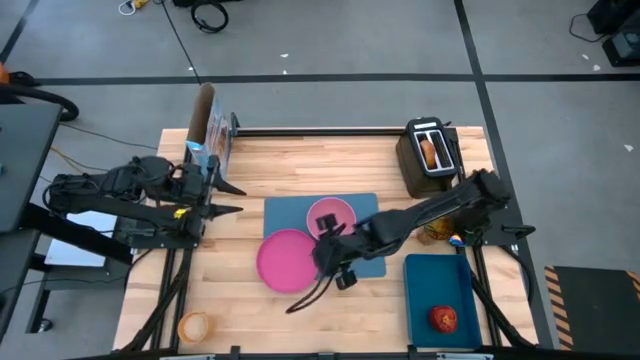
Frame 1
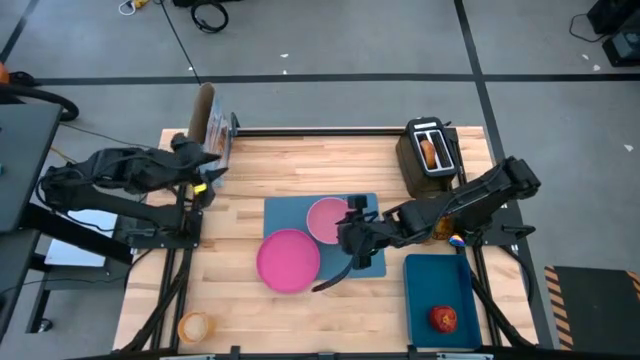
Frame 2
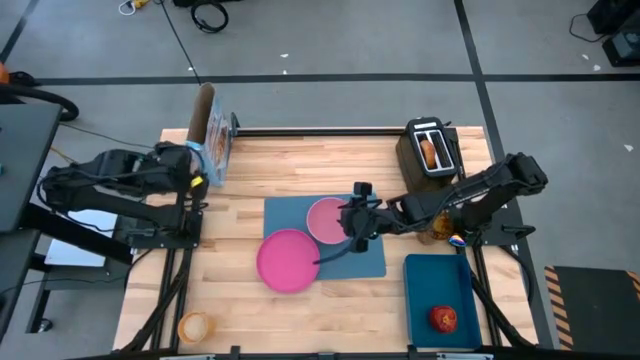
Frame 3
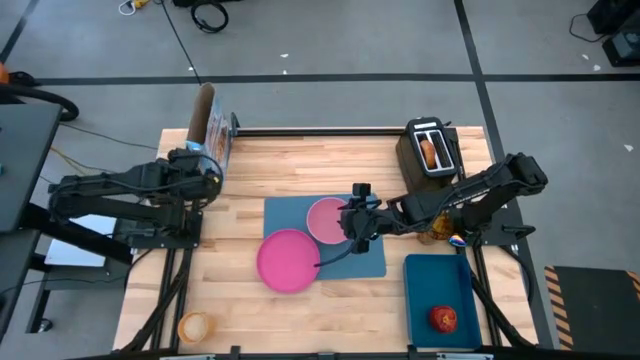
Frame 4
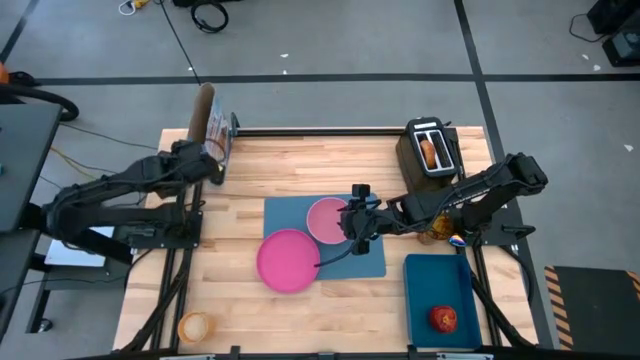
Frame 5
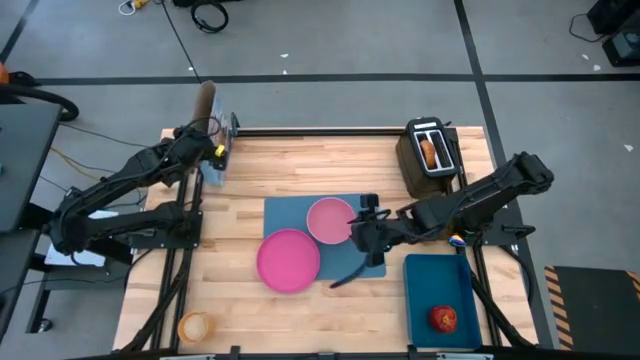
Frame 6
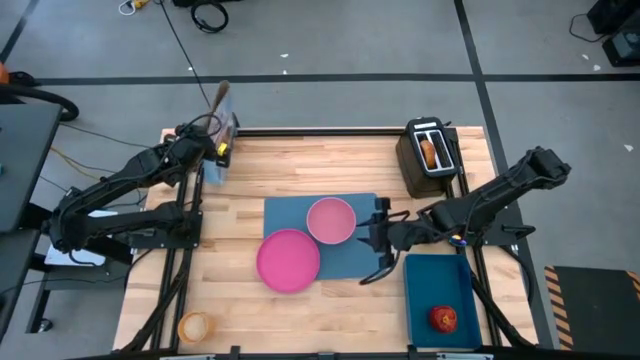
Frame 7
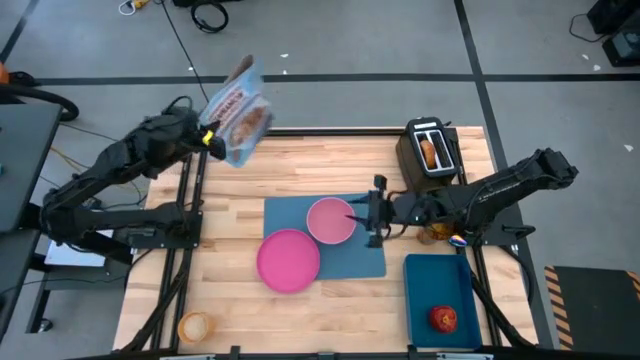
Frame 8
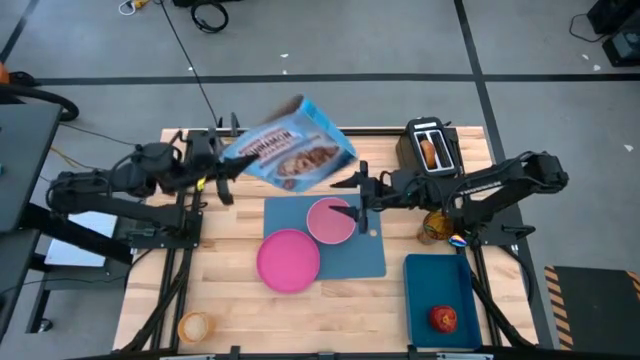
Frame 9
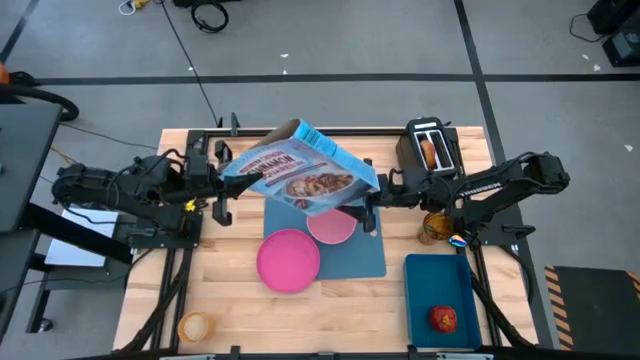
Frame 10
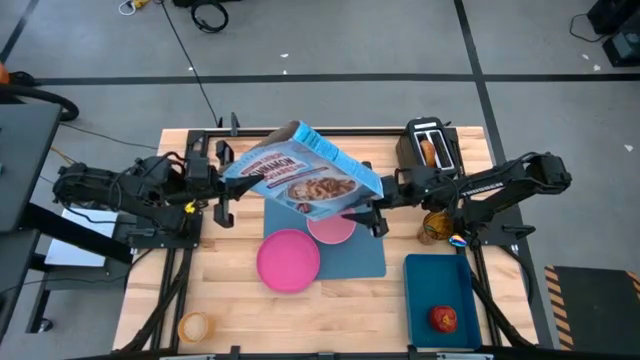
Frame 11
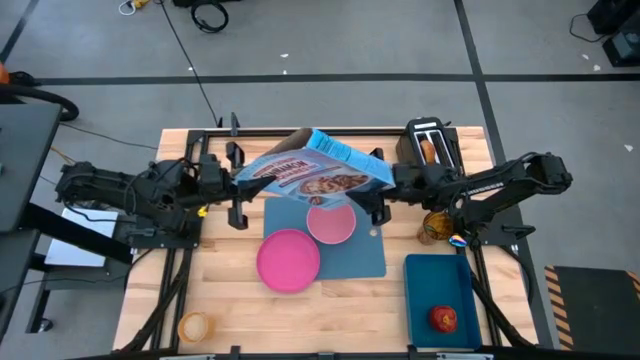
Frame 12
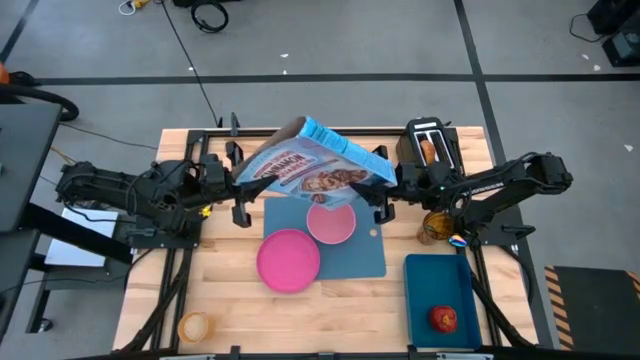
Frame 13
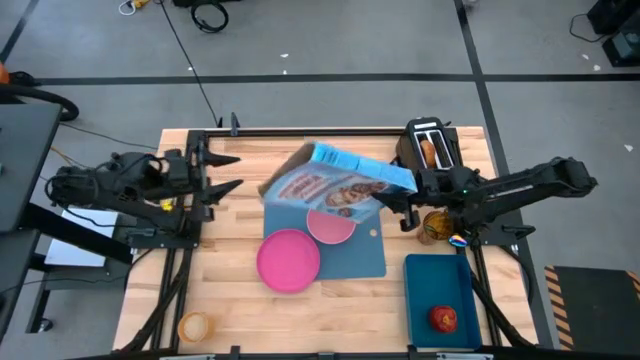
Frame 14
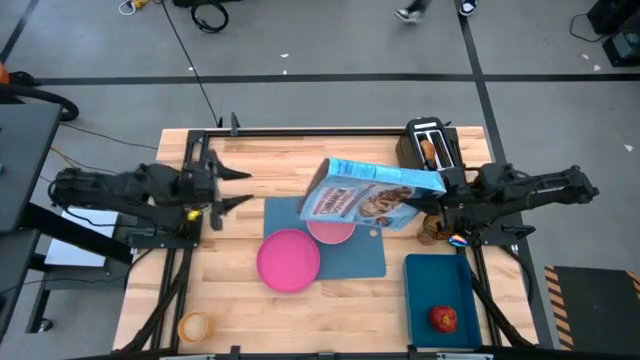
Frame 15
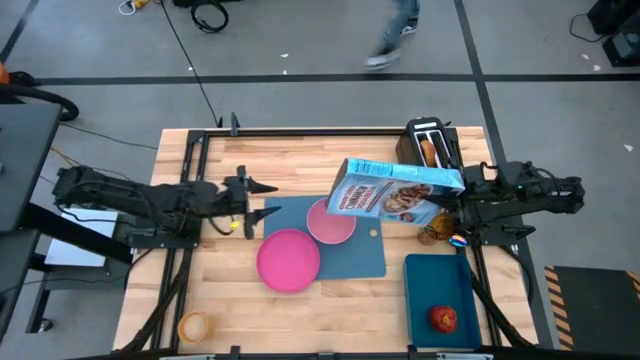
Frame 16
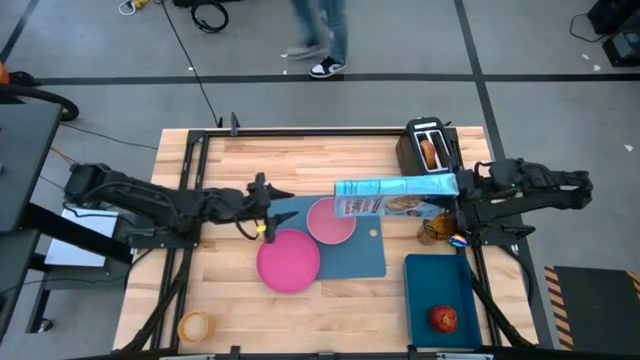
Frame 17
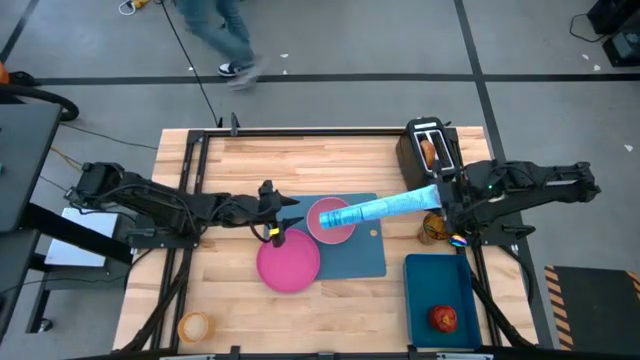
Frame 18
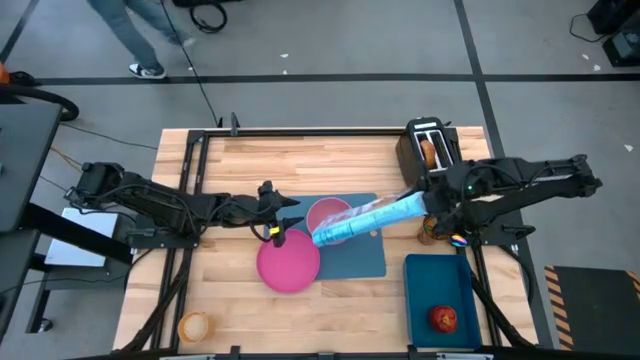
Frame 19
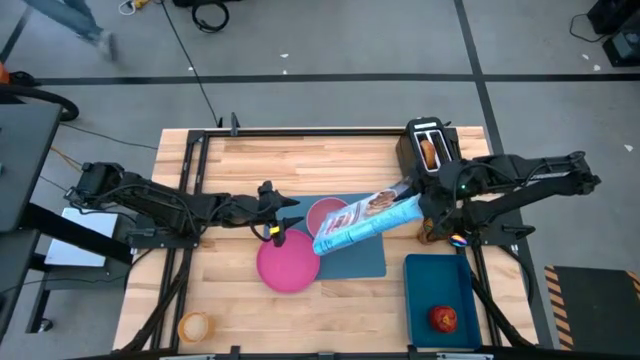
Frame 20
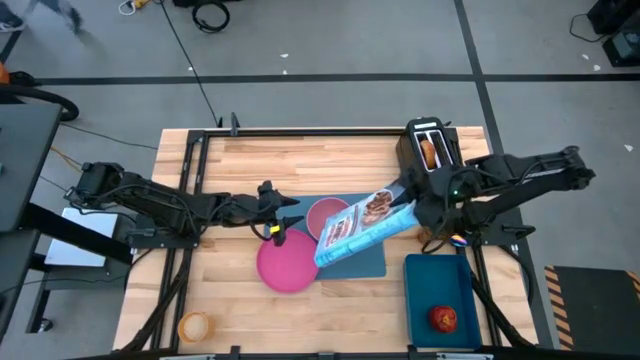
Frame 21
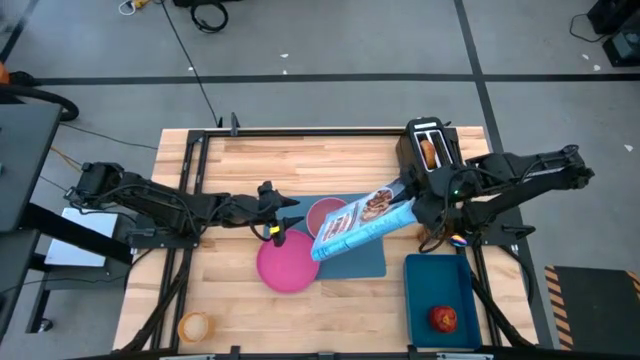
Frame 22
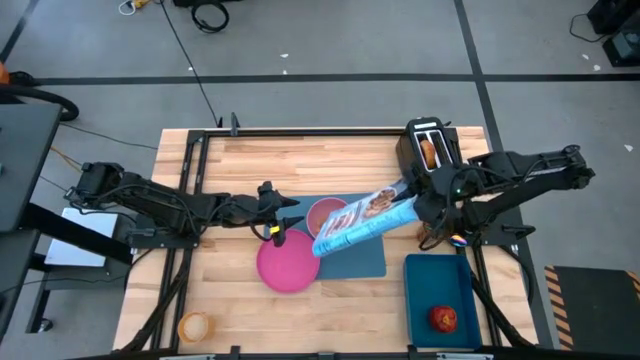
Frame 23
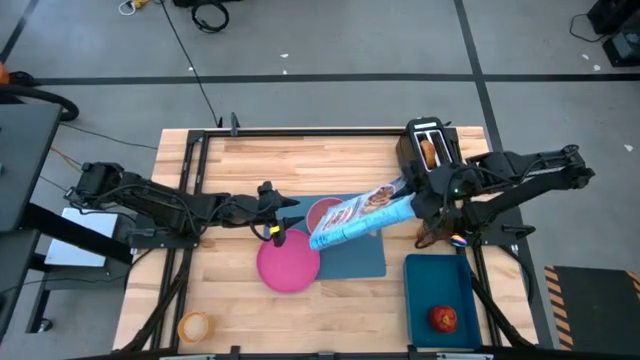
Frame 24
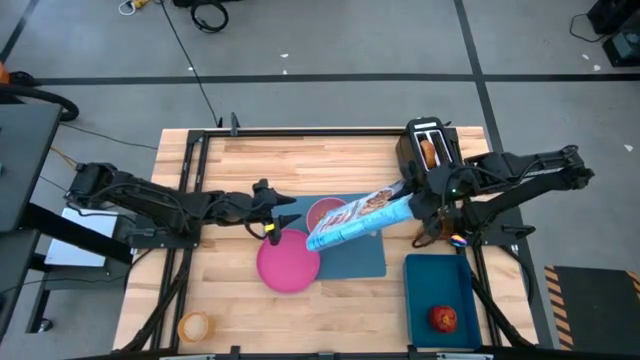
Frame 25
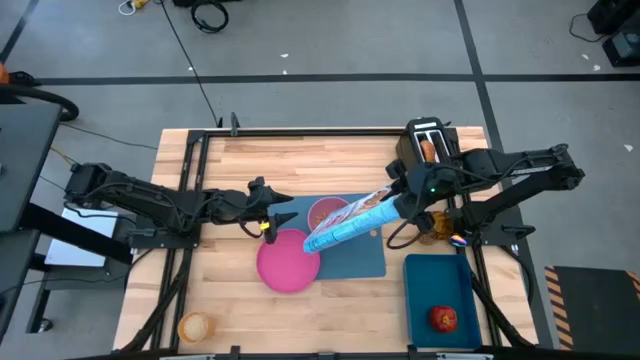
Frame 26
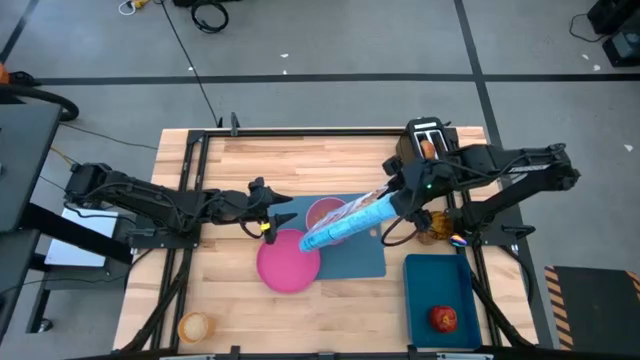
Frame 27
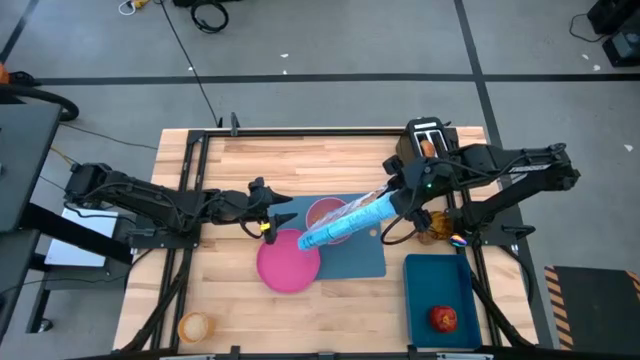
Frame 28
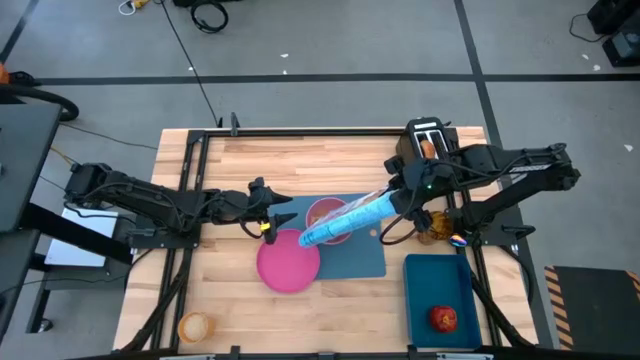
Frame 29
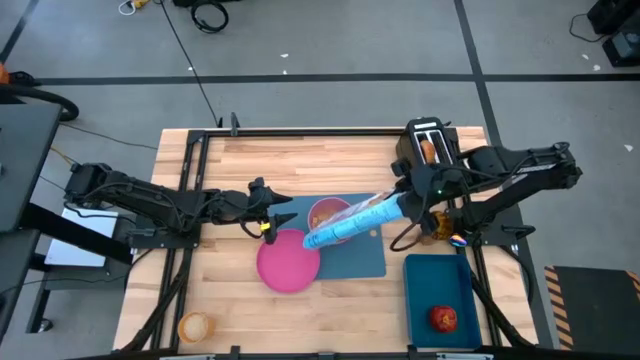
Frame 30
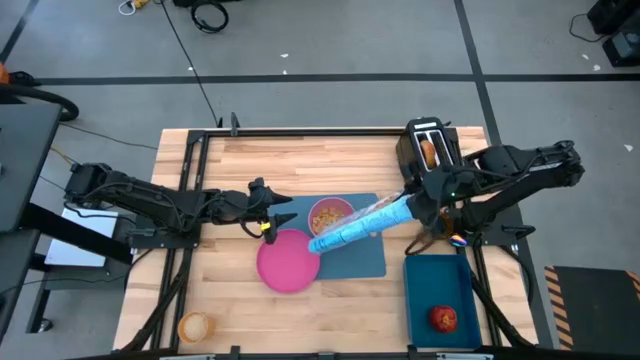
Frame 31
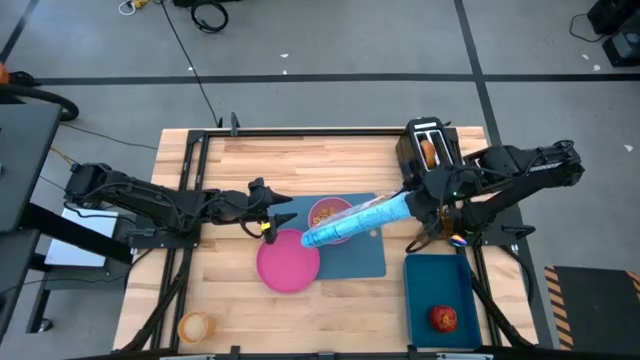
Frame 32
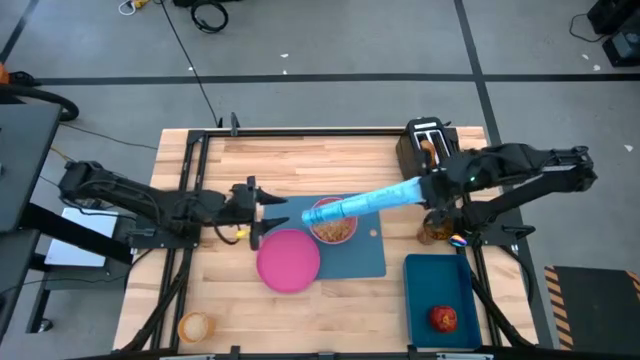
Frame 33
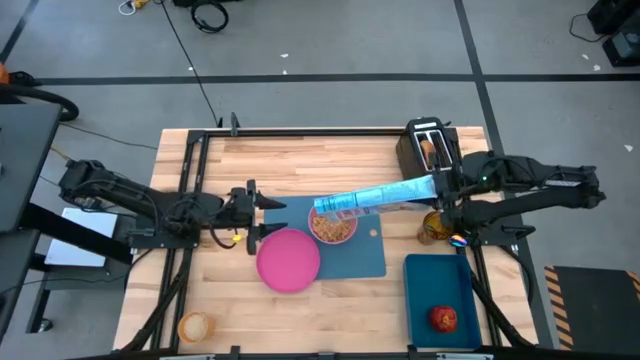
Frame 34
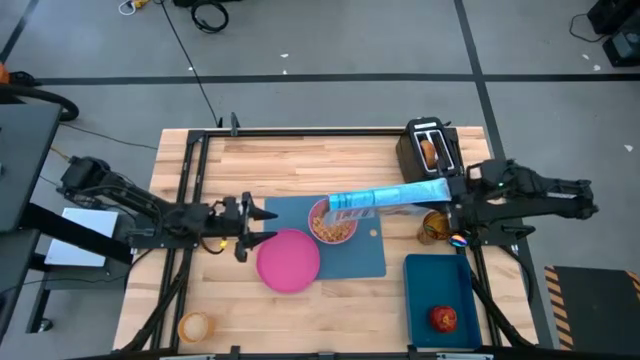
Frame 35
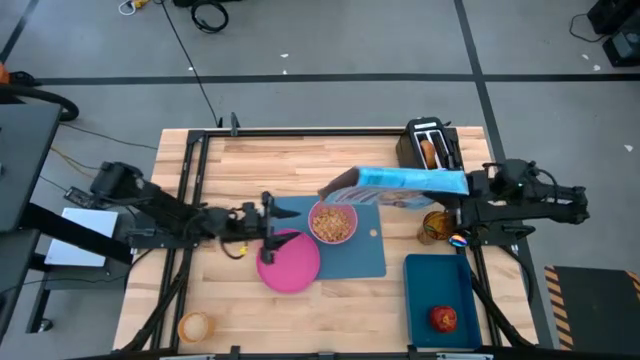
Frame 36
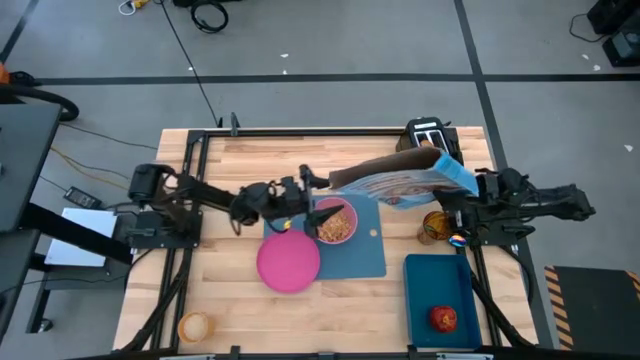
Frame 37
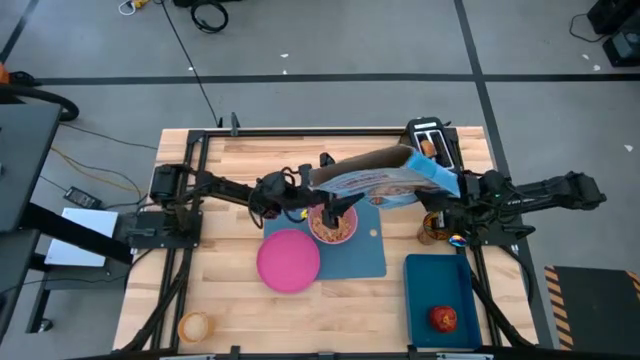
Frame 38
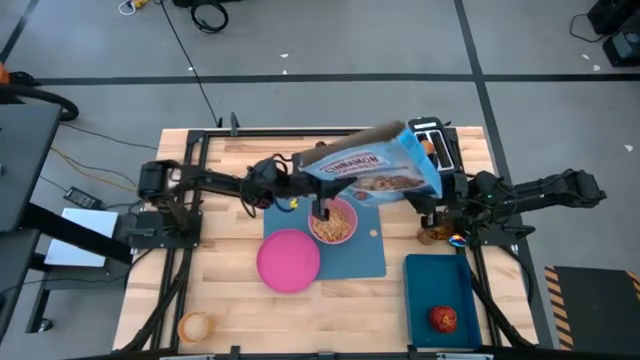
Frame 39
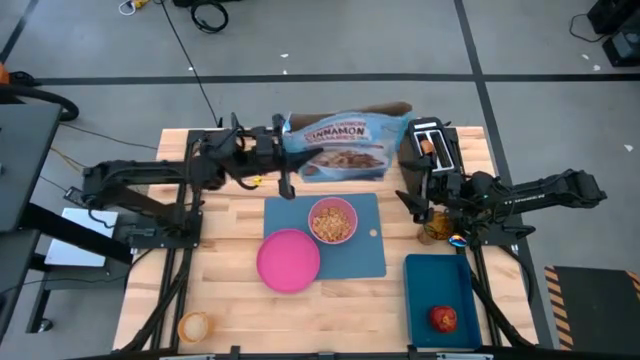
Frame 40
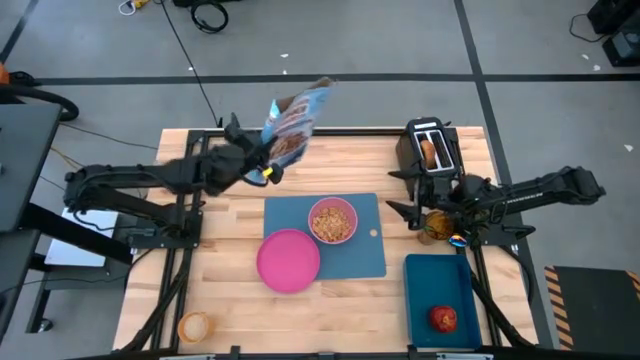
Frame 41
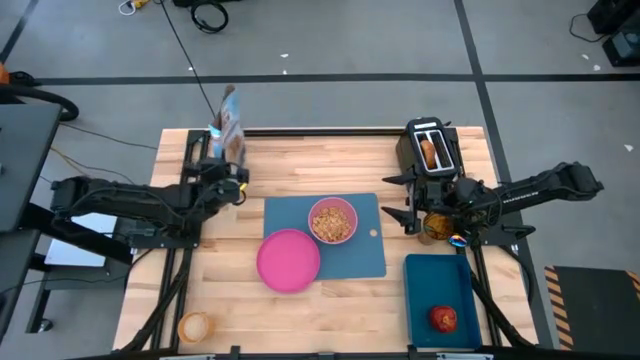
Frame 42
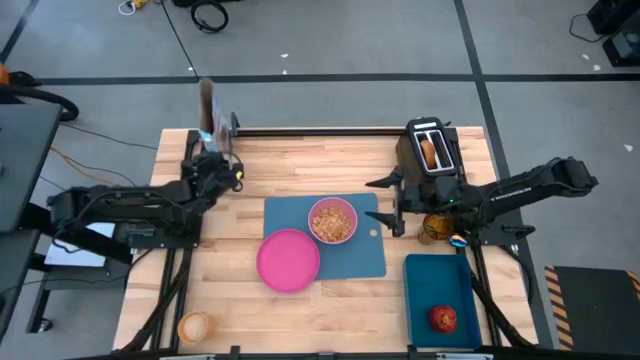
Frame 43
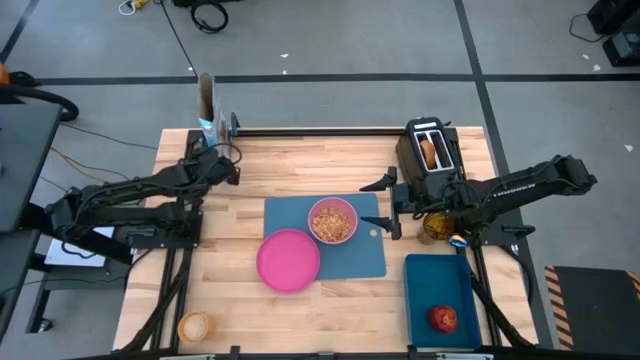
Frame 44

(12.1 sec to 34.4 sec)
Task: Arrange a breakfast setting
Pour the cereal from the cereal box into the pink bowl
